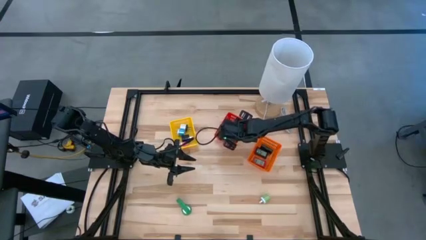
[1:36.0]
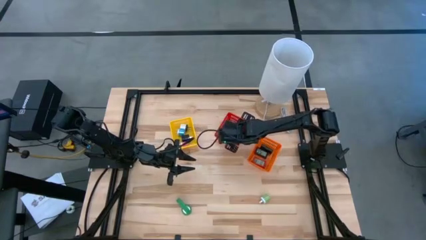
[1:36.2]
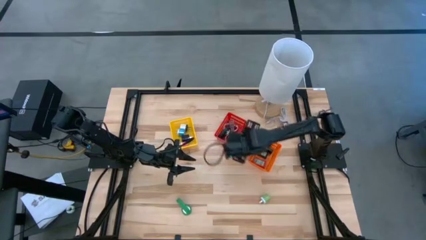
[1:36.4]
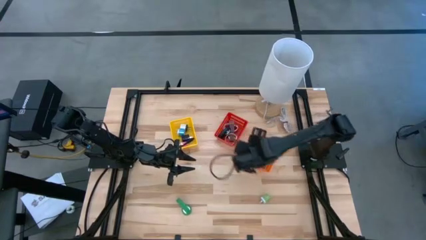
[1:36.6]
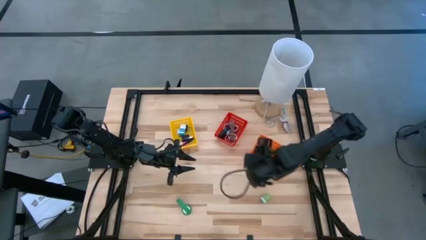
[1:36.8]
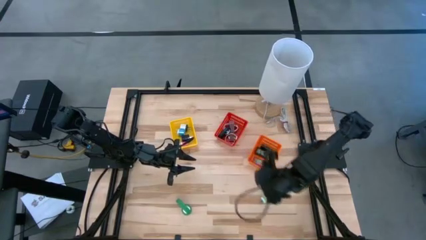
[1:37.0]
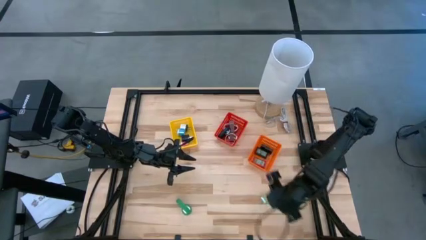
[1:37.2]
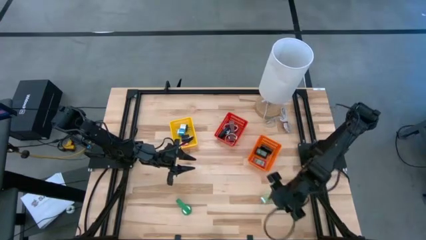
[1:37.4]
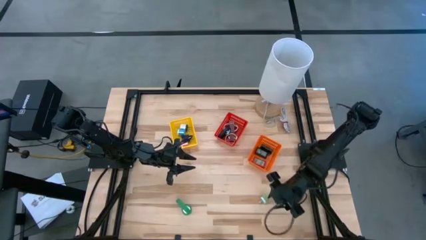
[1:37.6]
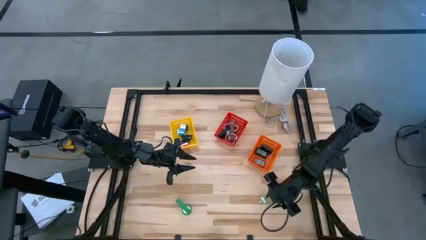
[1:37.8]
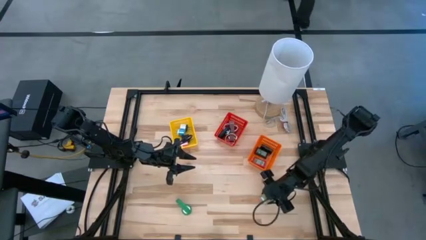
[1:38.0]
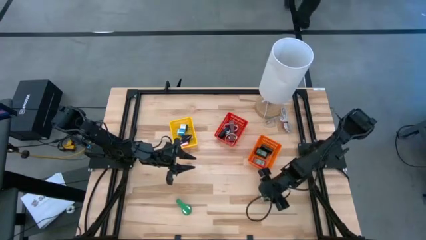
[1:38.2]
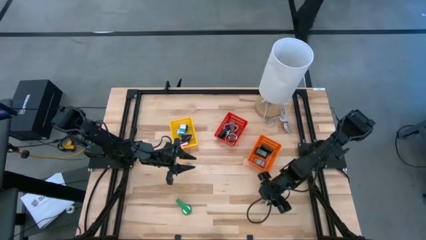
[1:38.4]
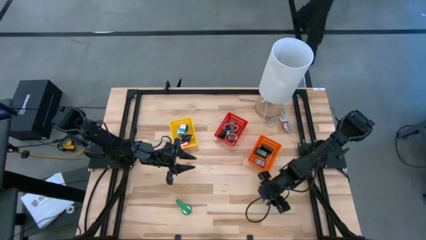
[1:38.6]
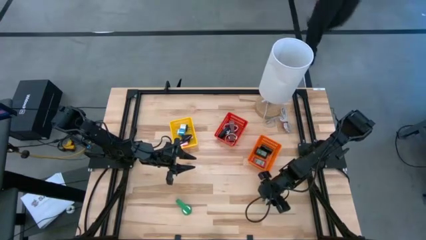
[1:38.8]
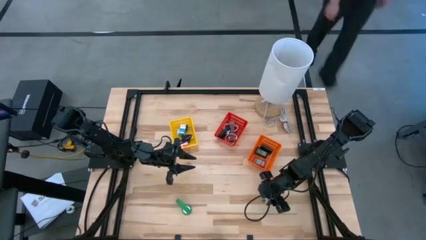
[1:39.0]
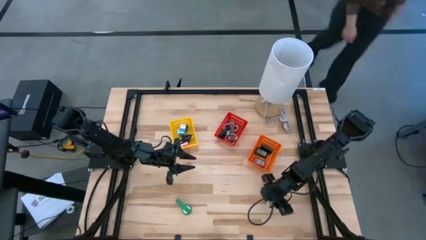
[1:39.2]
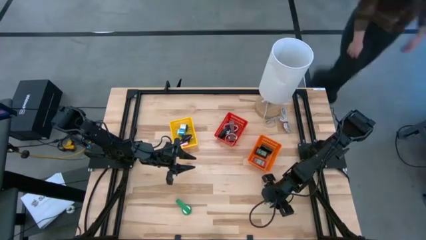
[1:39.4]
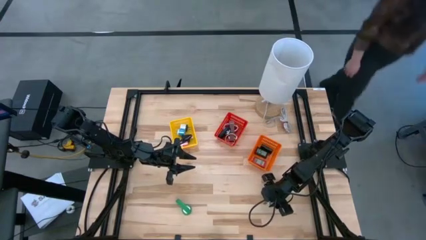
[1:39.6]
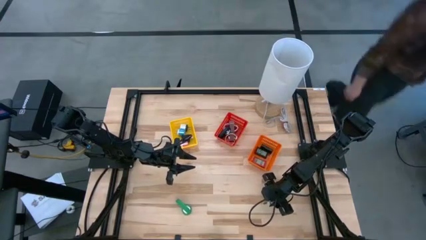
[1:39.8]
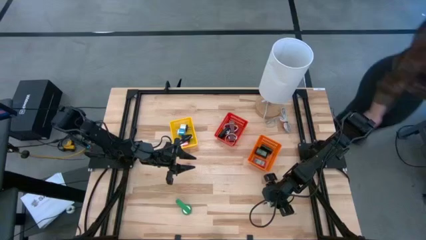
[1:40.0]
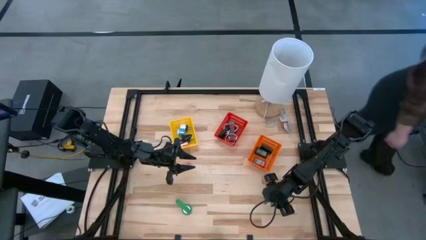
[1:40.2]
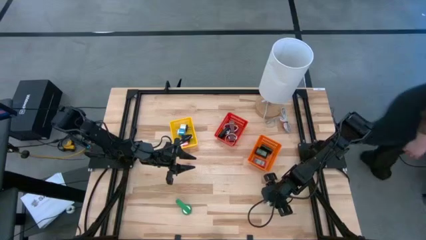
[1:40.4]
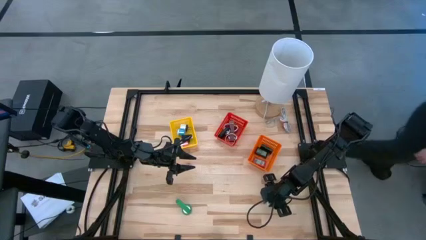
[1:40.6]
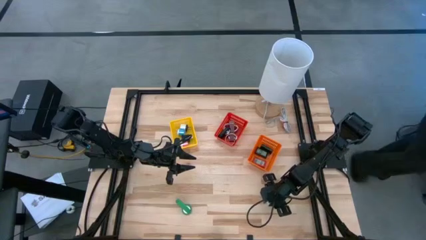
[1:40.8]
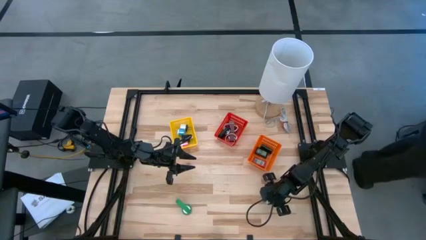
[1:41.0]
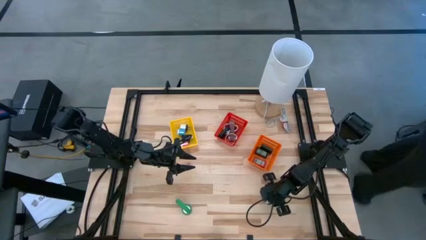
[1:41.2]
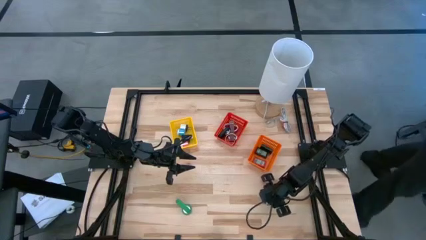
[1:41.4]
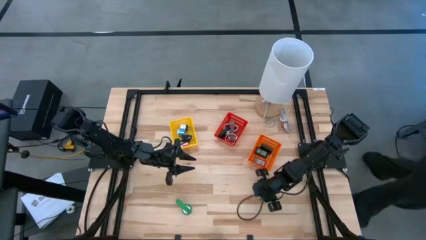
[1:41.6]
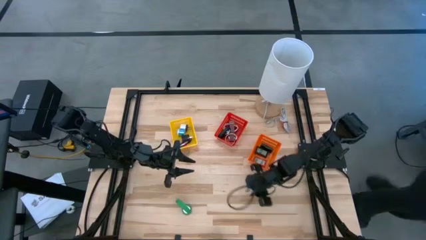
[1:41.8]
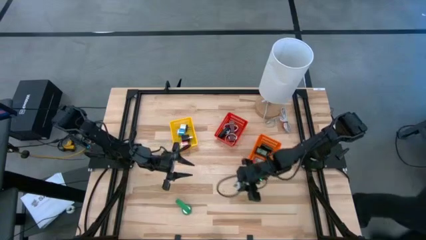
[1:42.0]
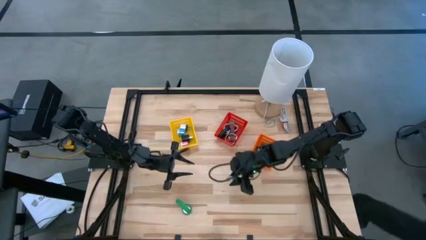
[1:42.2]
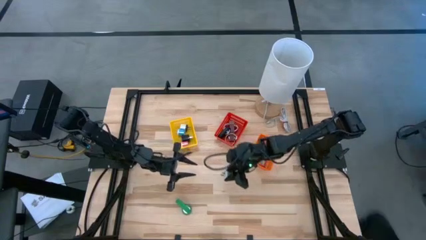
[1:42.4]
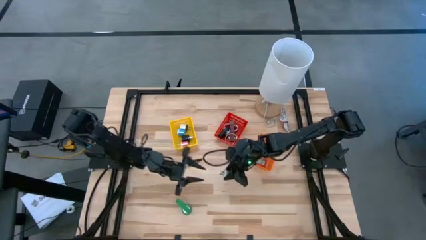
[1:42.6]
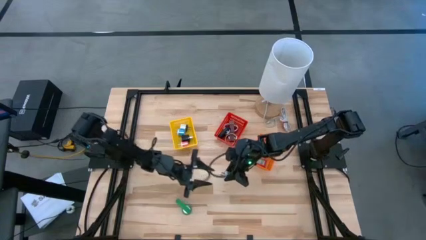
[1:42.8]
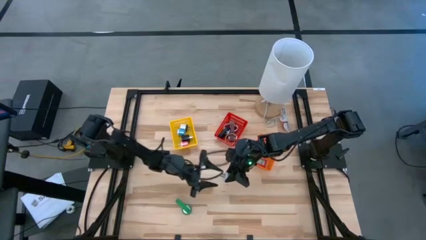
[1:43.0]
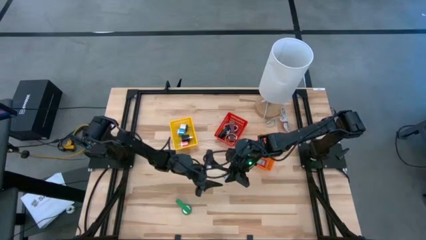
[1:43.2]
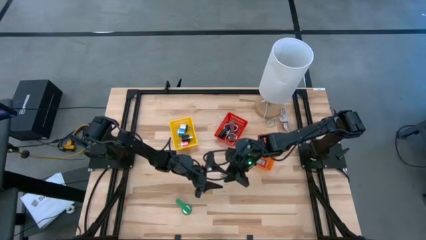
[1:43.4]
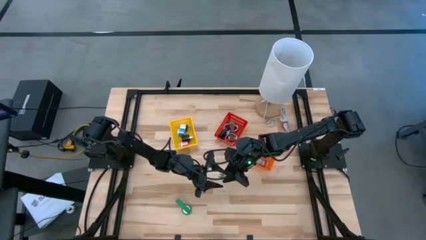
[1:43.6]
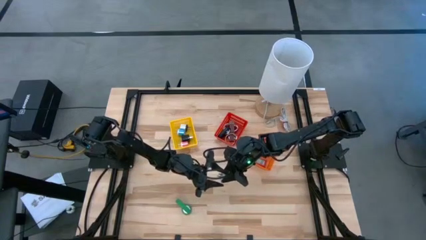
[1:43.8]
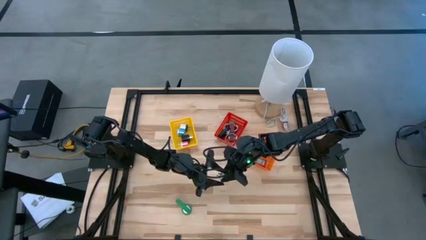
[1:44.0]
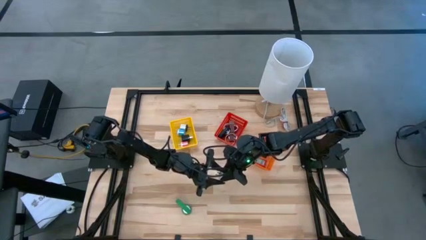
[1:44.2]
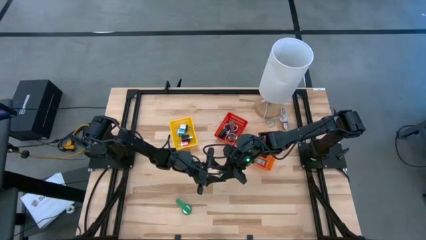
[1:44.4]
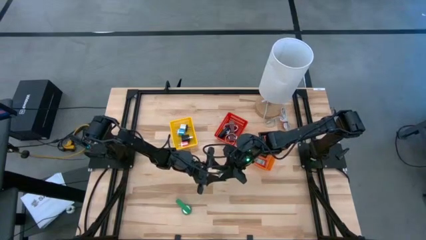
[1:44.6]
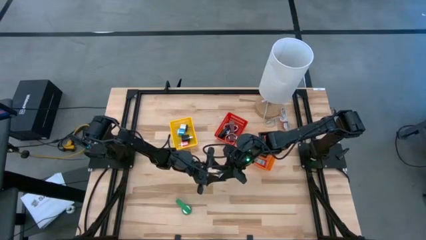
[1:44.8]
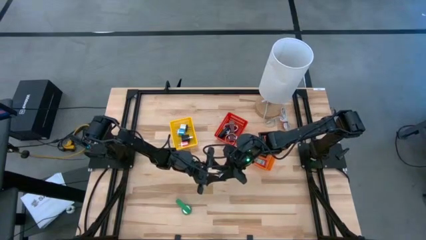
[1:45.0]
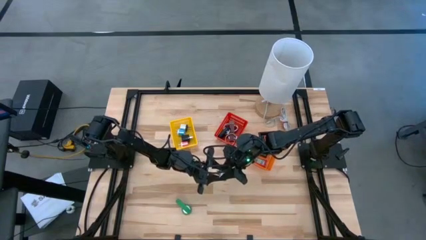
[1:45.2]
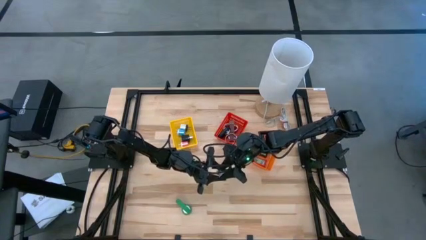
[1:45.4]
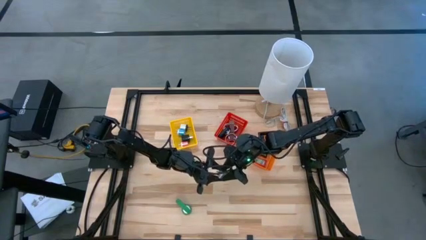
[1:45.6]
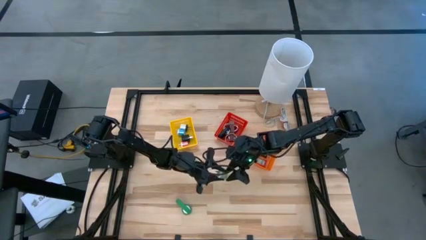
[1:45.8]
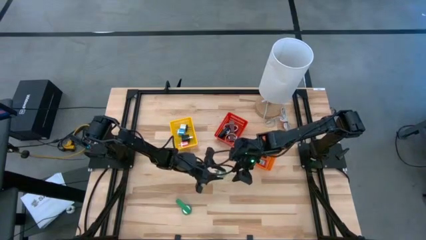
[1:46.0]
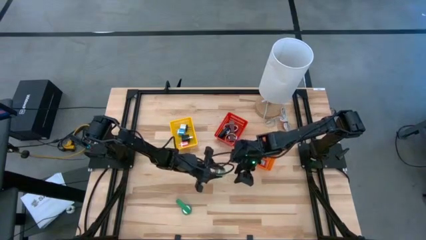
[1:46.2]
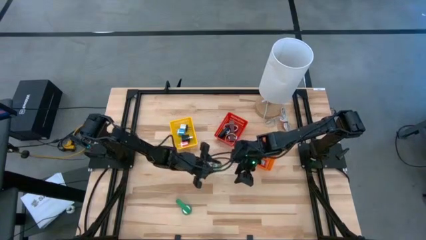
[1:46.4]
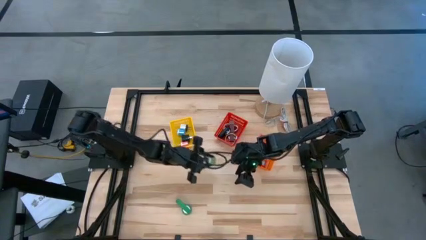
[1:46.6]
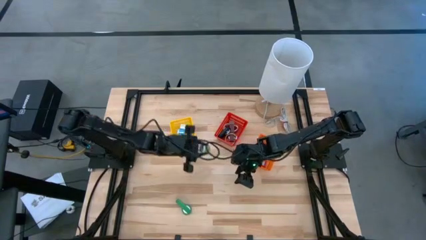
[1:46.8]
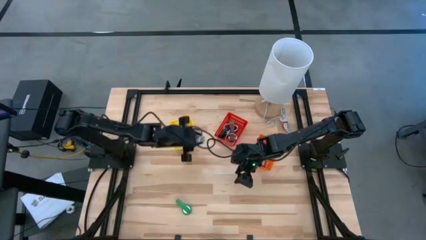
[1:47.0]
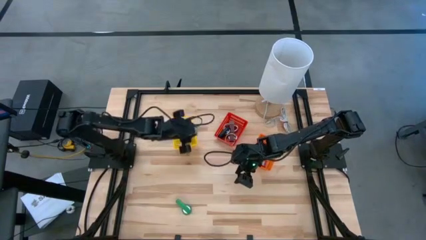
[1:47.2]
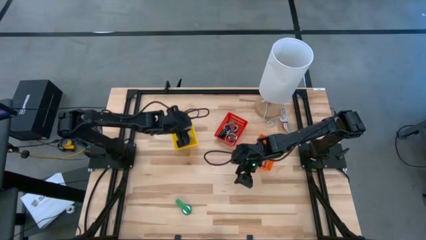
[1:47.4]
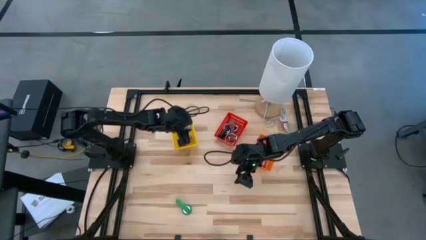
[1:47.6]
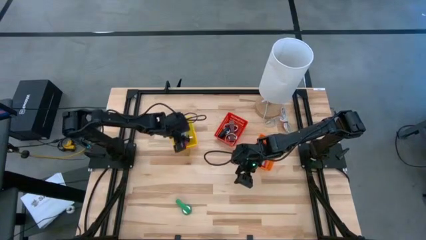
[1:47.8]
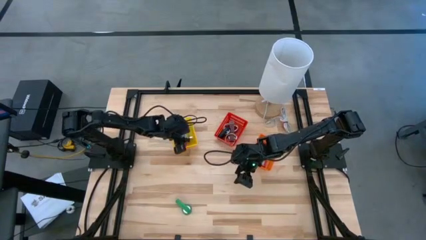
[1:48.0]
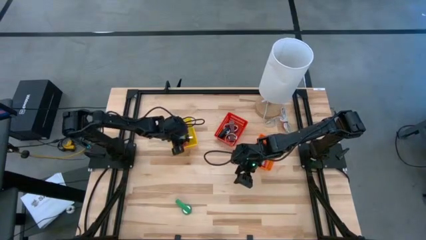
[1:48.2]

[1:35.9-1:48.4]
Task: Pick & Place Office items
Put the green adapter into the yellow basket

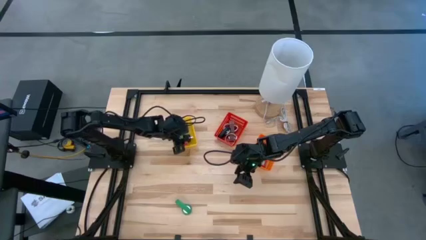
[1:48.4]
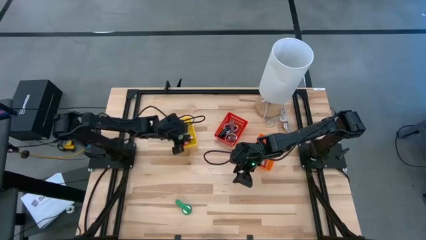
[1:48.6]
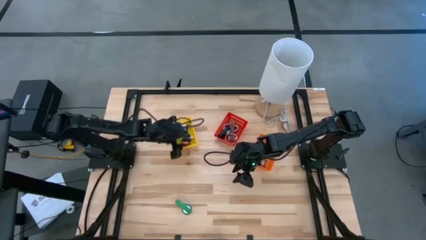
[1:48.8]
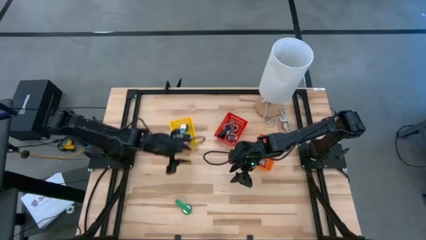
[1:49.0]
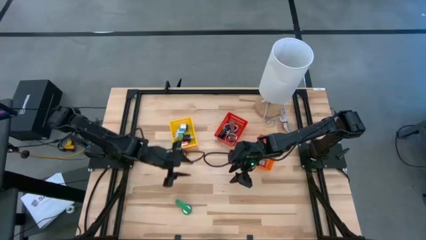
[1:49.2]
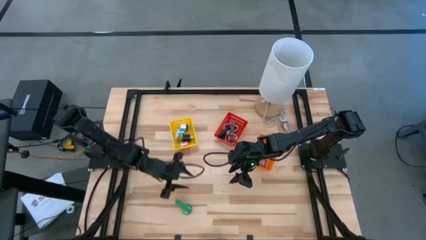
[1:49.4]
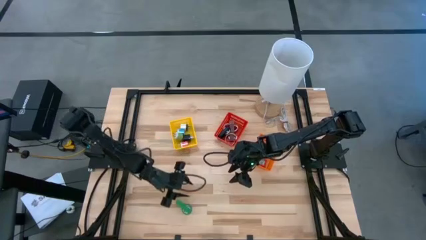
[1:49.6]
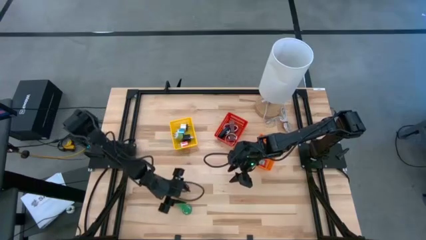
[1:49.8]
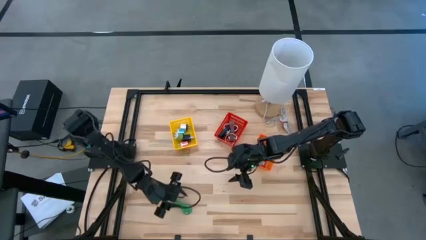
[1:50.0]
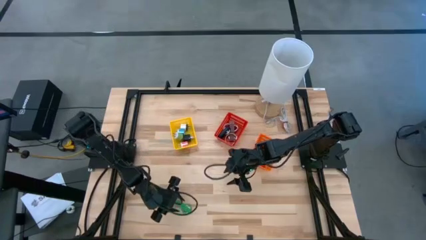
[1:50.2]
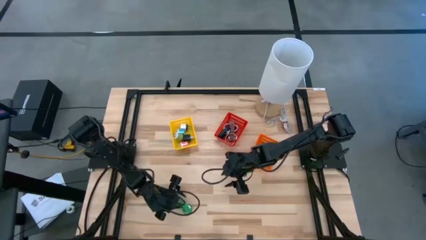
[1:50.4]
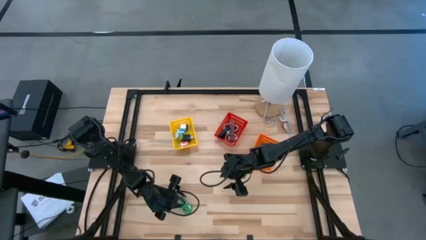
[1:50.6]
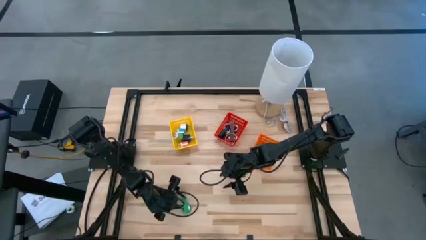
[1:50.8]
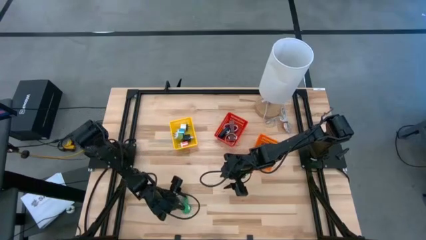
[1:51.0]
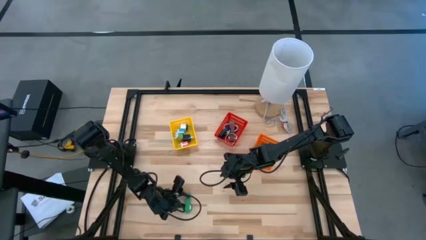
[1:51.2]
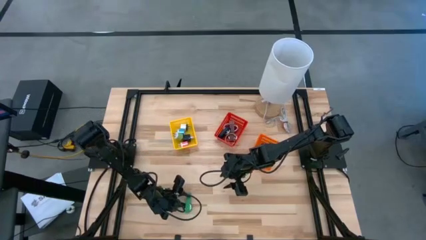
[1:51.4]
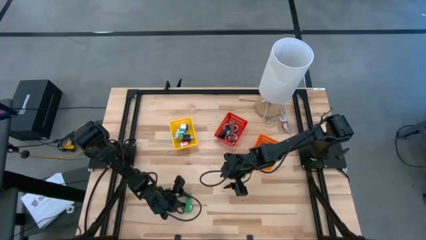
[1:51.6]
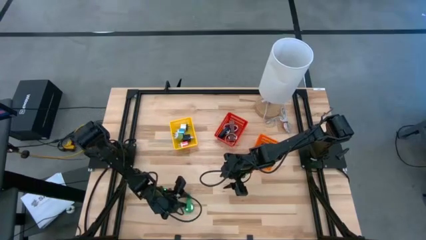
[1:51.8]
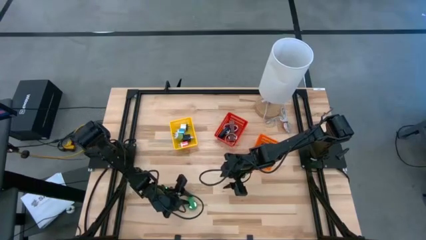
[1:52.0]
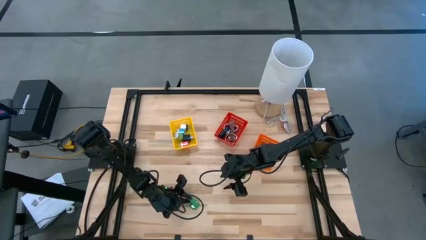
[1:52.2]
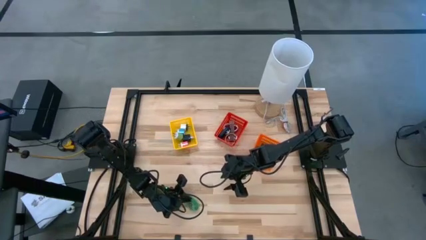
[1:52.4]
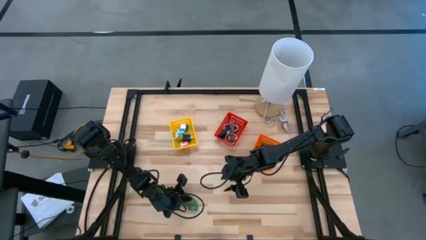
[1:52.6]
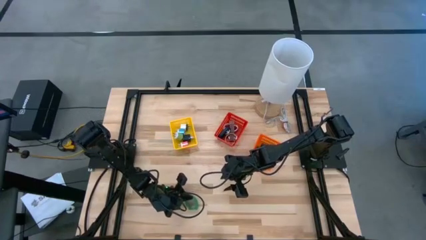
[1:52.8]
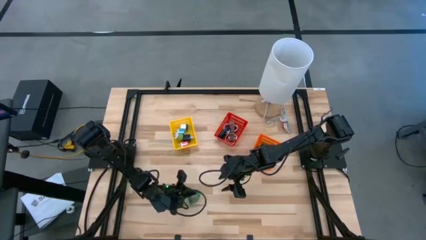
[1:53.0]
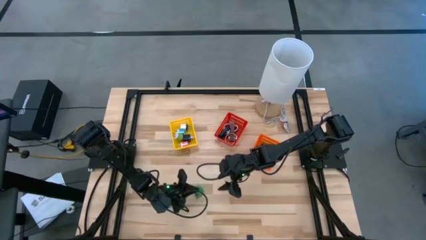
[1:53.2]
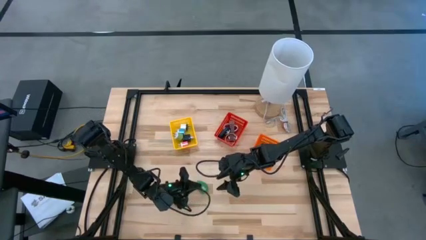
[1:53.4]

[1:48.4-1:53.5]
Put the green watch into the red basket
